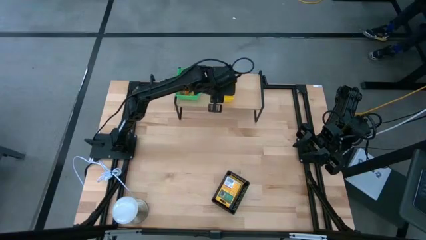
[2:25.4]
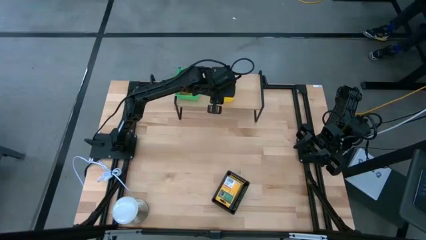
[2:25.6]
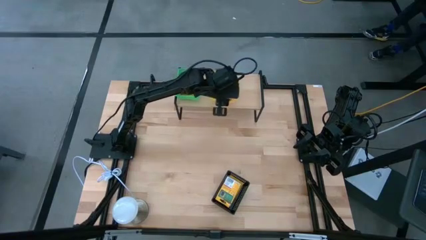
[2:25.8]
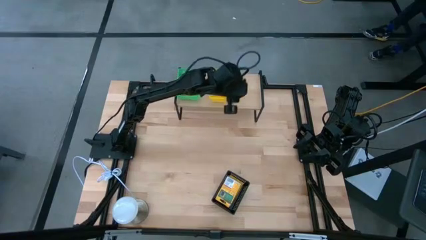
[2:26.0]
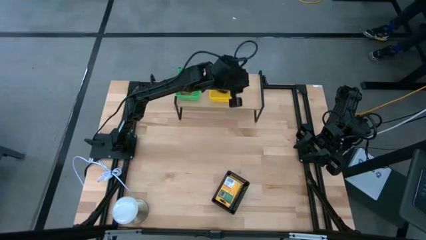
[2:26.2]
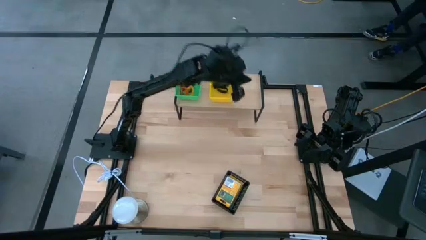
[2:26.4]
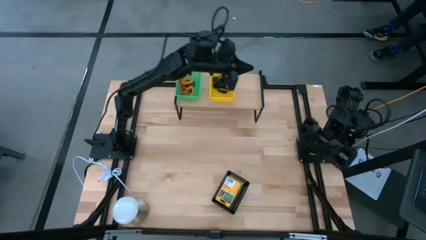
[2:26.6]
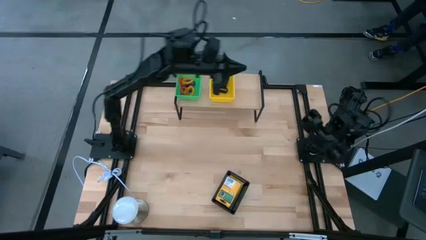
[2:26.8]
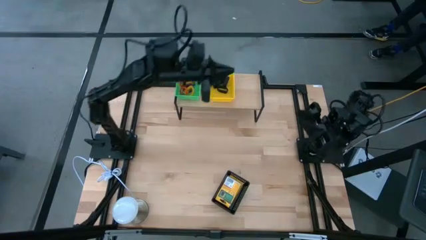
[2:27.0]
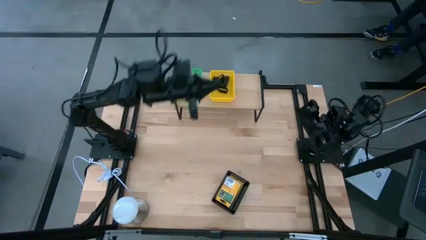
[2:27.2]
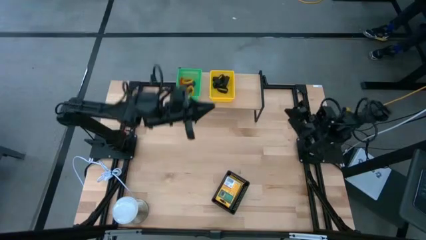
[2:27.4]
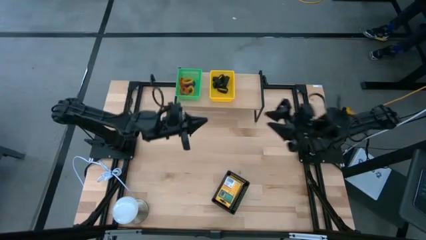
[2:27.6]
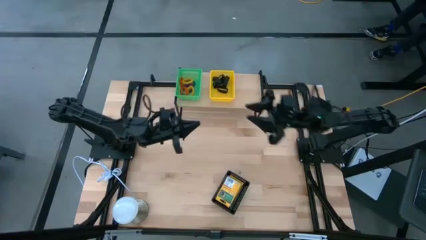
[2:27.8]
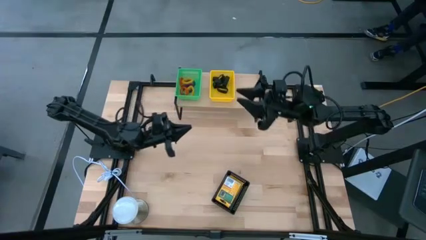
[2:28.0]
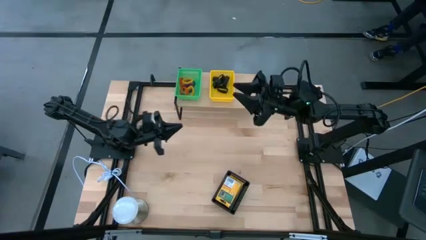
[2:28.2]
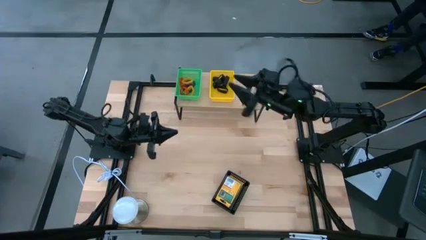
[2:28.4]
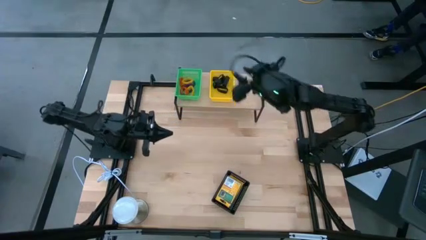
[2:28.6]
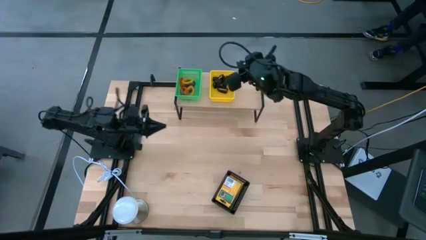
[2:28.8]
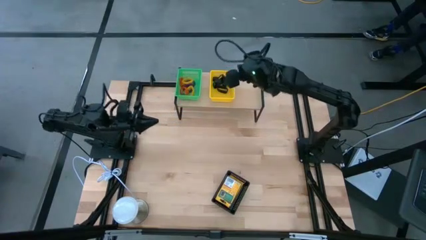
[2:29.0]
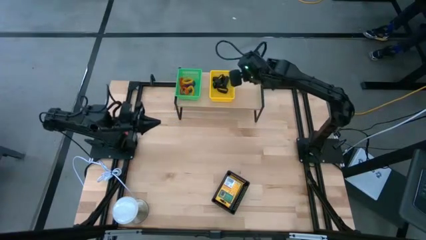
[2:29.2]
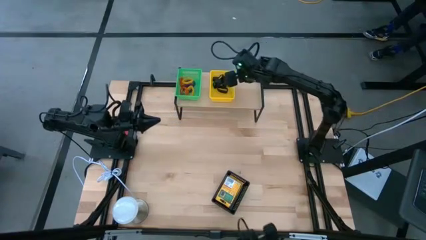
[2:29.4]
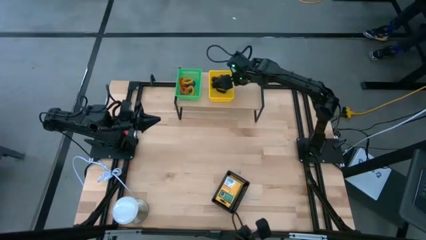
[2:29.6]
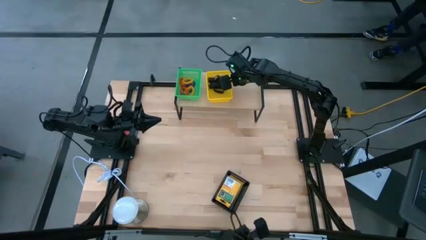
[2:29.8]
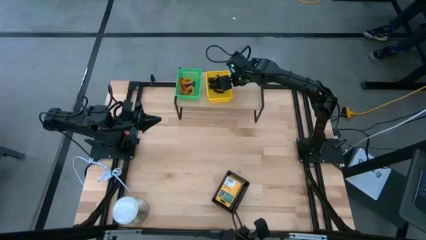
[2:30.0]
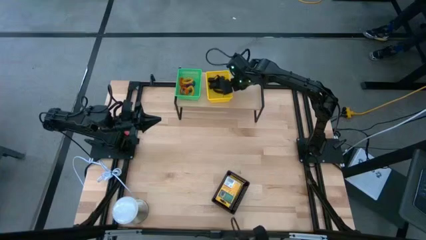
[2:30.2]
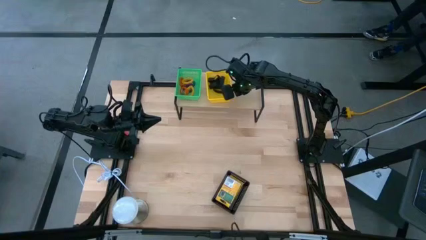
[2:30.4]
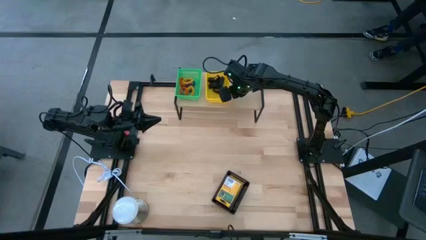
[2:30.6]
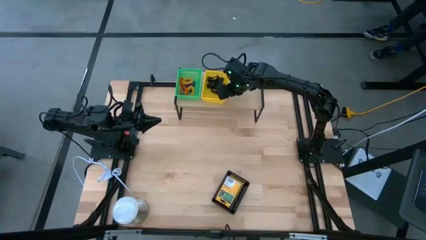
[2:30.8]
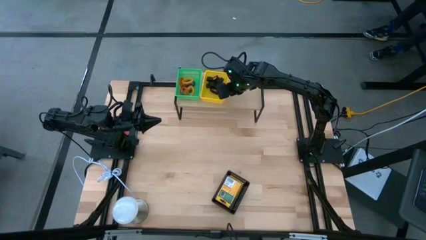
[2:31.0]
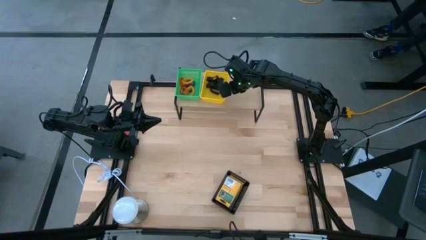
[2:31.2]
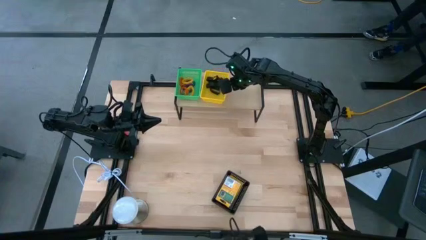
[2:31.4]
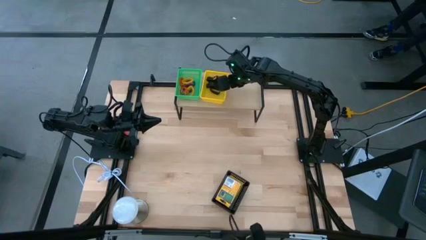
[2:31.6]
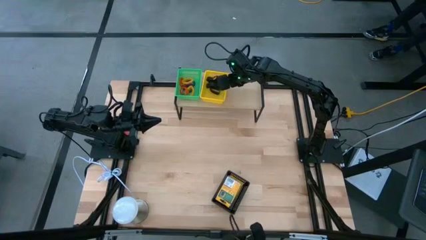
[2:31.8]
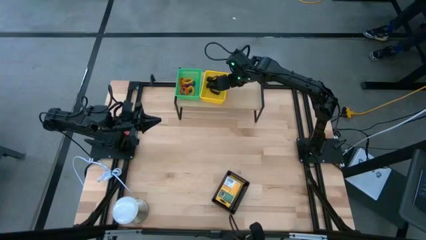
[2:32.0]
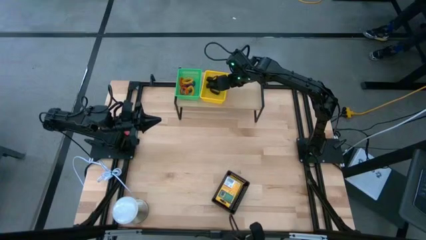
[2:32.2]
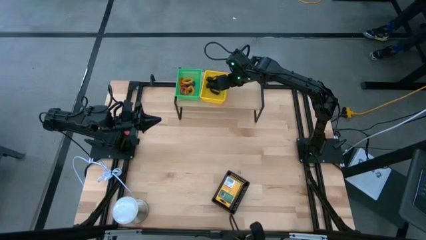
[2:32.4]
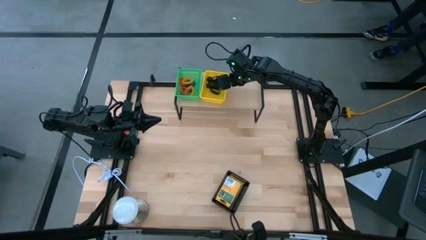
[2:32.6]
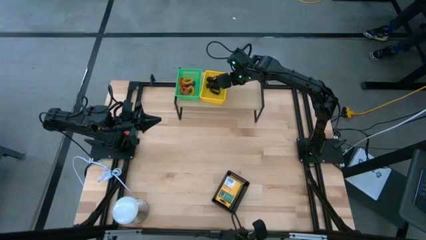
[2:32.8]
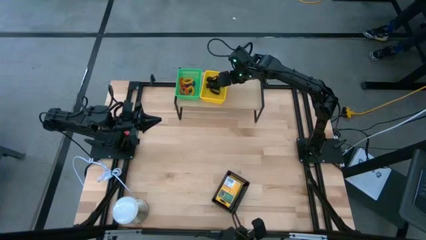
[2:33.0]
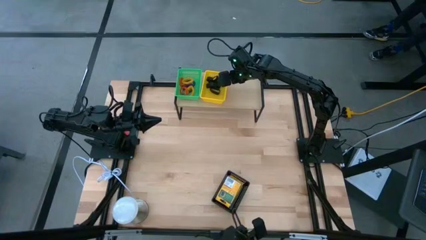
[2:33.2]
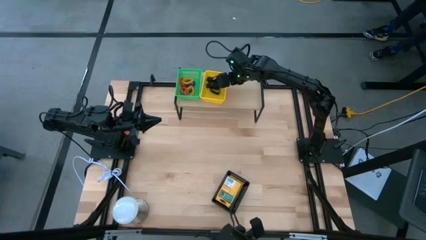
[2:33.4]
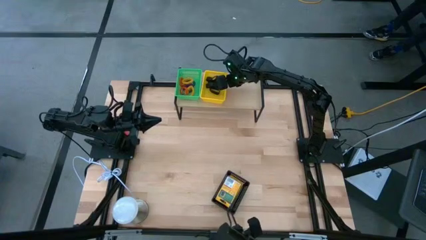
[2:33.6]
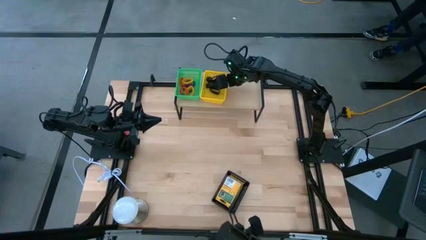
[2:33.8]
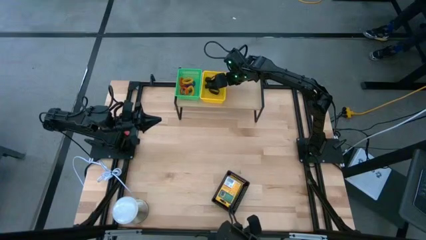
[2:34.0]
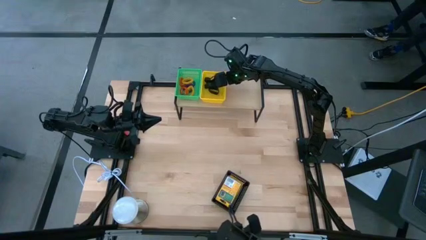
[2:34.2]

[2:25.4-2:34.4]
Task: Pick & Place Office Desk Supplies
Adjust the yellow basket

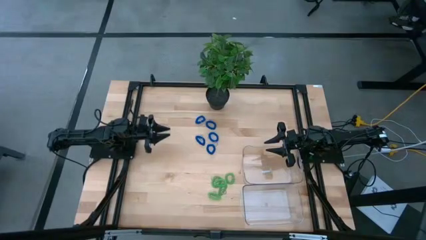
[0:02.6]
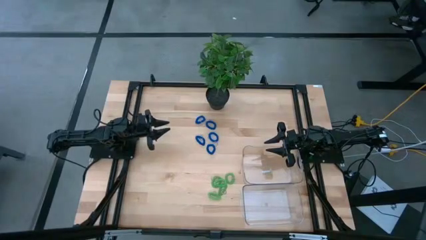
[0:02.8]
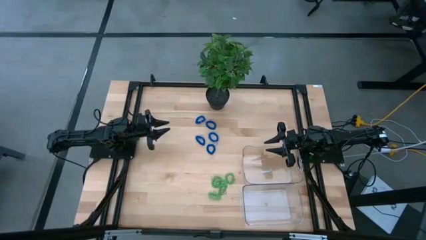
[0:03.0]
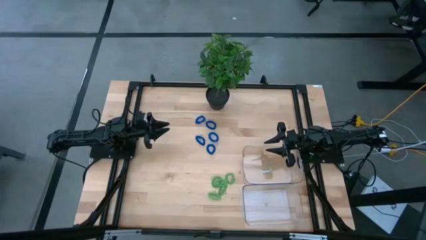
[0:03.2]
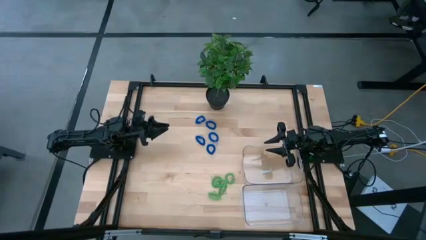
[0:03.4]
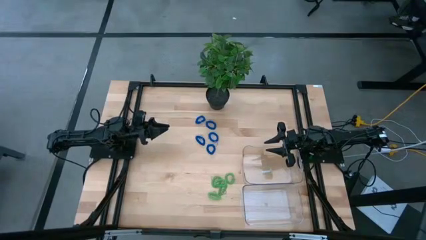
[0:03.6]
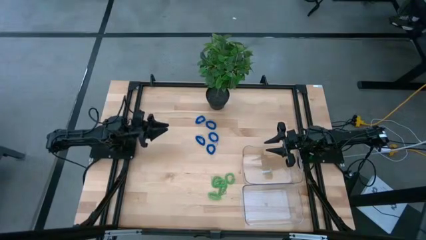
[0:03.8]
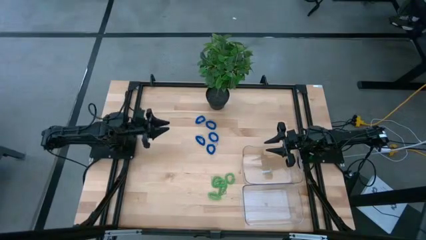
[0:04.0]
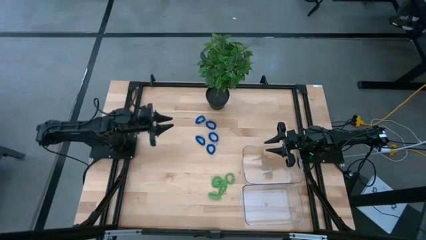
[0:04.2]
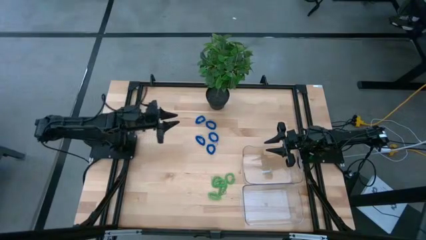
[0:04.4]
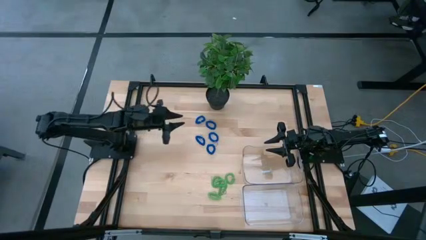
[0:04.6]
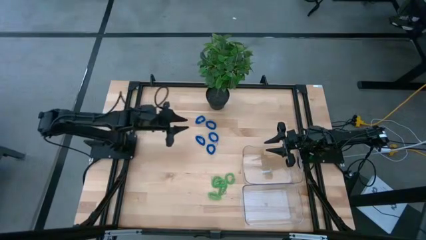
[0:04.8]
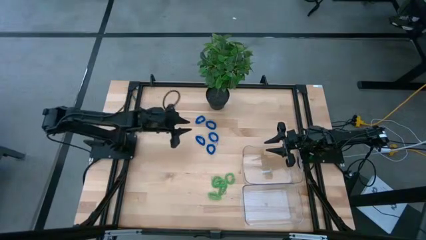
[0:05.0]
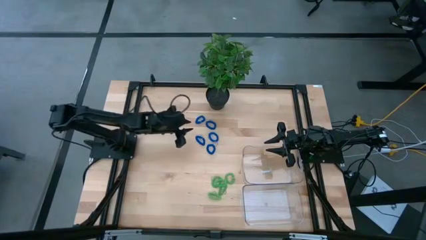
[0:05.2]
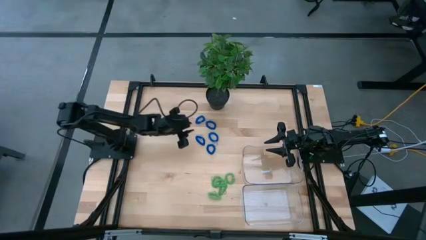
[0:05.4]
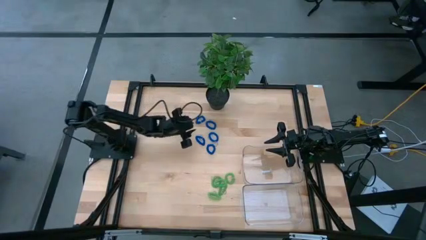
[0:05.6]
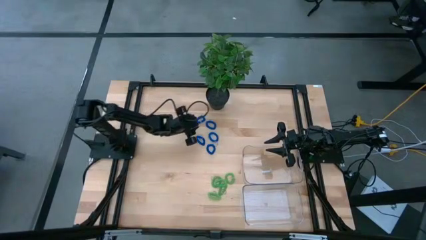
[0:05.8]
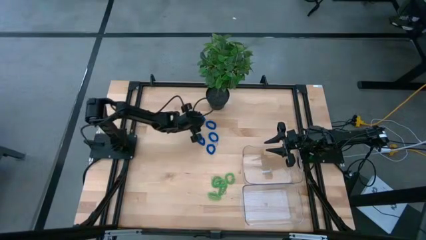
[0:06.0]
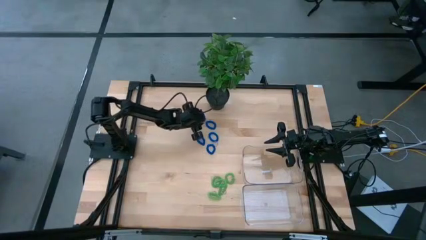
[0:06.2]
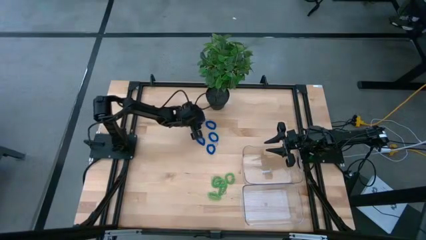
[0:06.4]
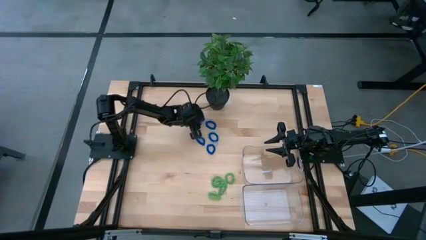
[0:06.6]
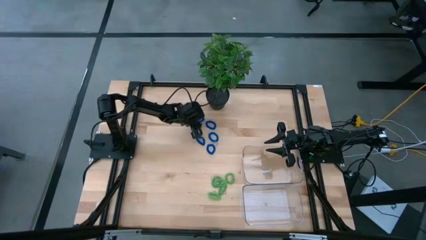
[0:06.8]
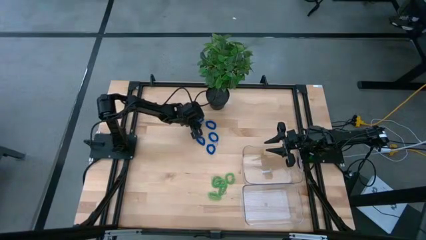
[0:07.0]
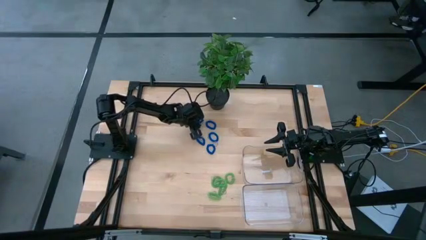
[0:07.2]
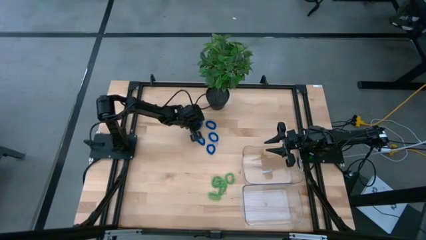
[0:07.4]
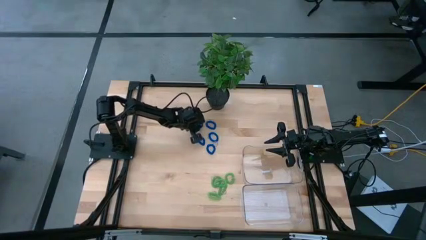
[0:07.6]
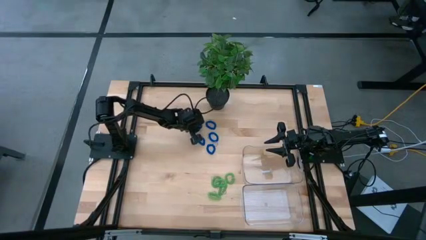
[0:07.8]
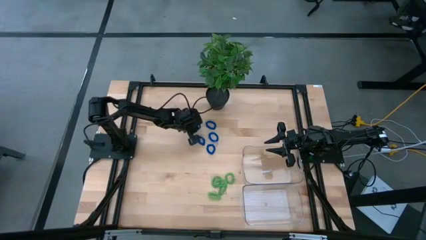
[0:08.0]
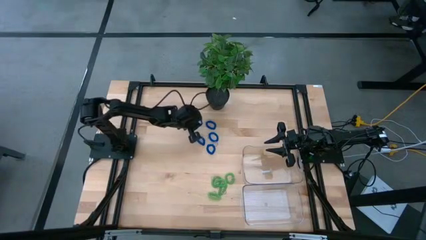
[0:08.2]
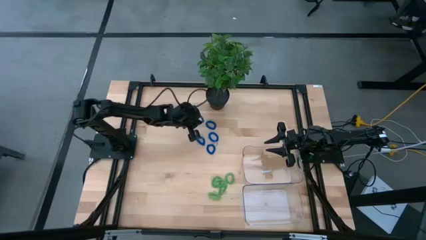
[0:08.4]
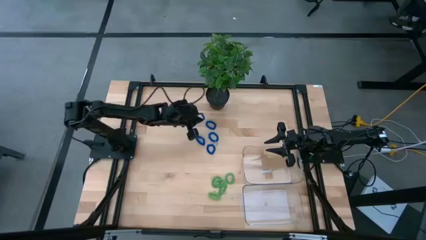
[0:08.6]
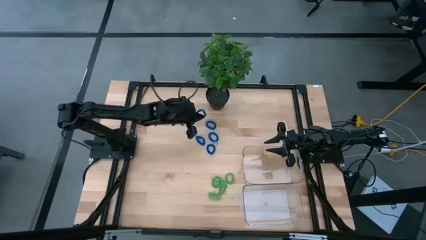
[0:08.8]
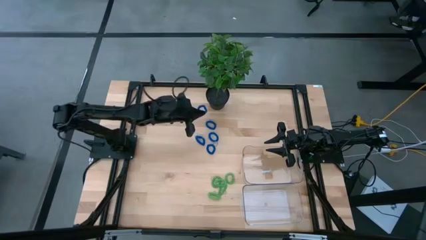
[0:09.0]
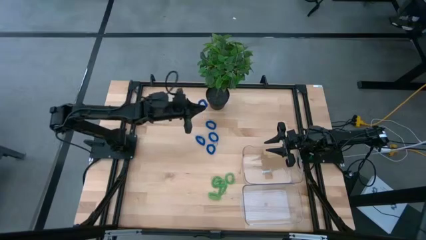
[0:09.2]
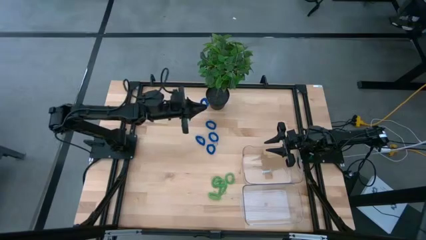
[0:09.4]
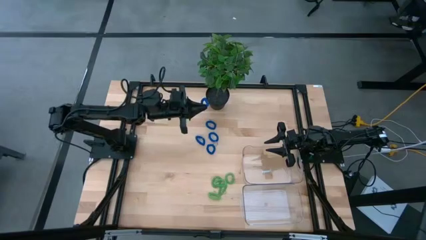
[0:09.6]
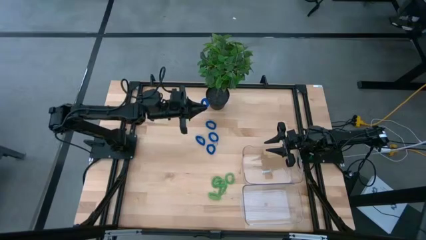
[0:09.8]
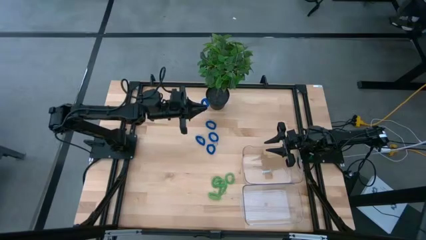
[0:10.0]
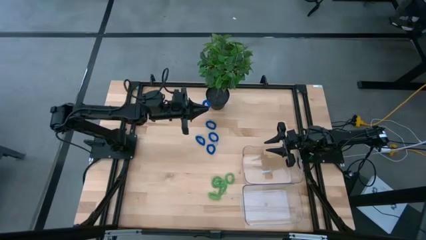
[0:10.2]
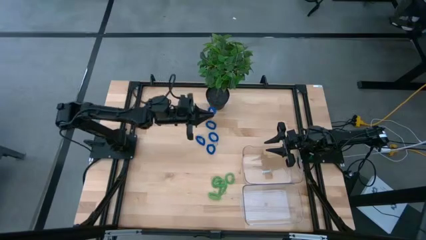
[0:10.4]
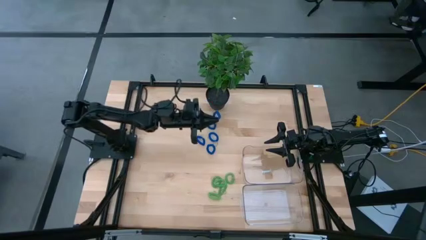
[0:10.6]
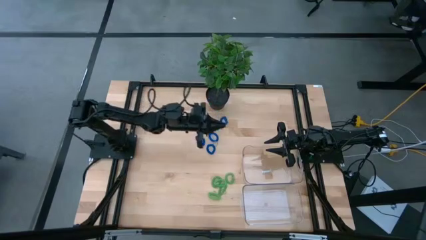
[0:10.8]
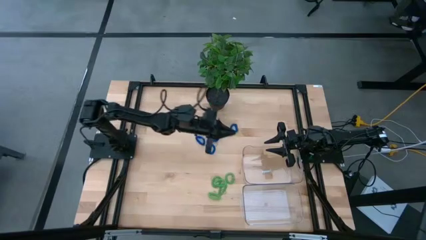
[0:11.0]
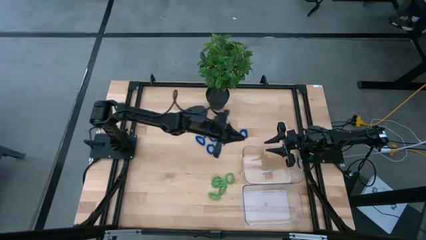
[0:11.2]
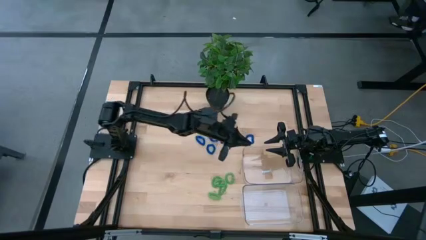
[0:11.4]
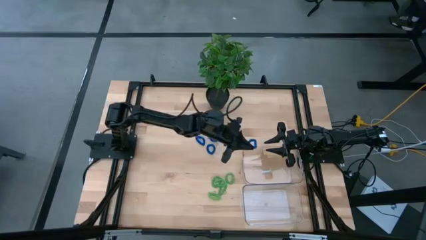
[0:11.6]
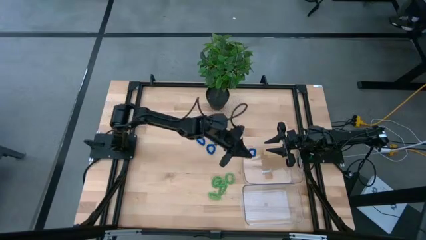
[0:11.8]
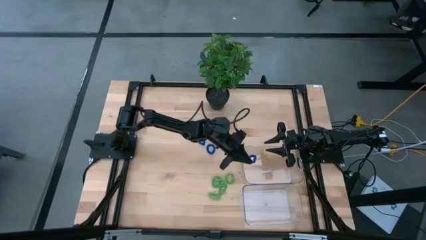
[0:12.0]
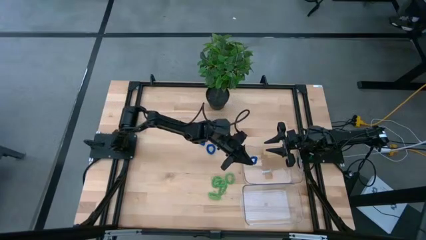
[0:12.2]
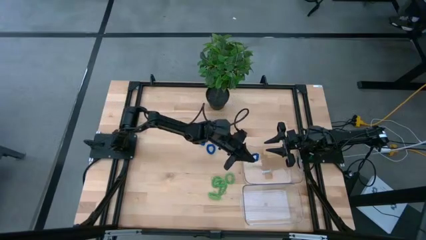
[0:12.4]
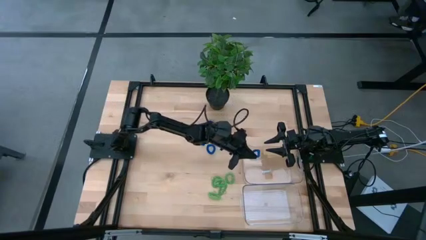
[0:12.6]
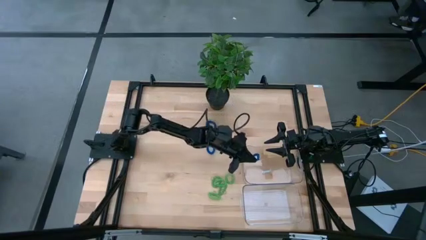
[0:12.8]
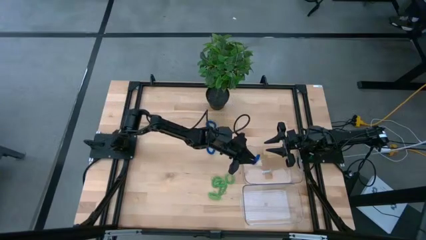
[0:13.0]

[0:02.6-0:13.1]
Task: Sort spring keychains
Put the blue spring keychain in the top transparent bin
